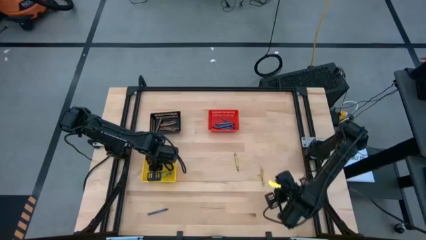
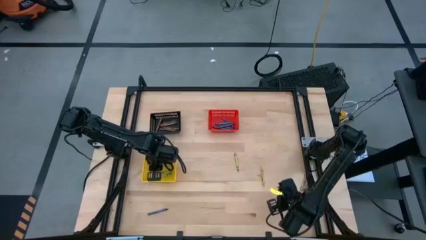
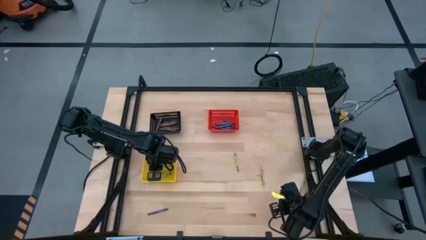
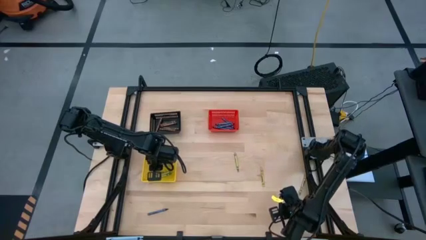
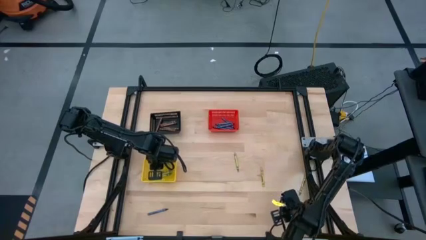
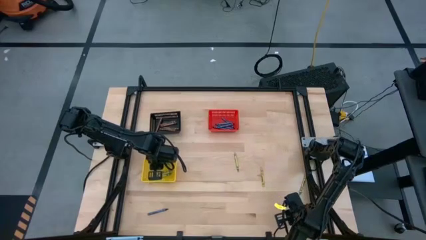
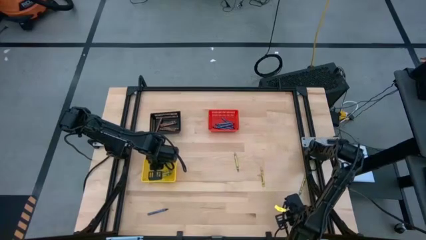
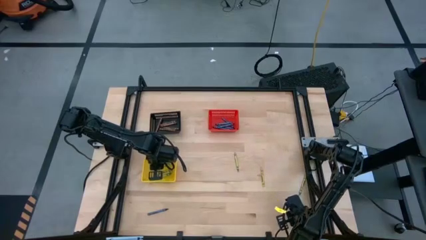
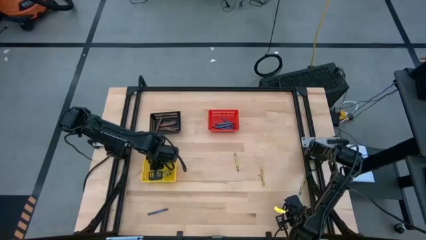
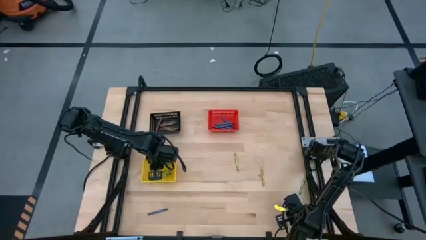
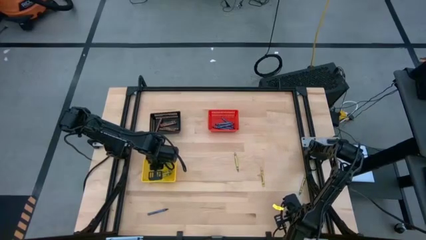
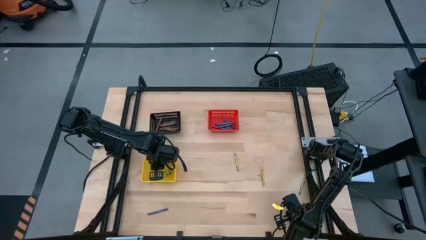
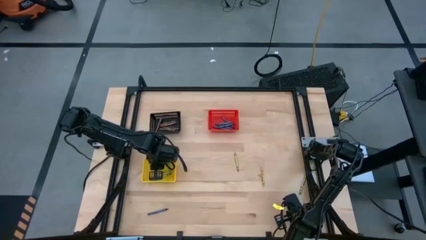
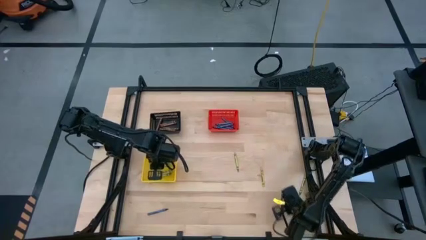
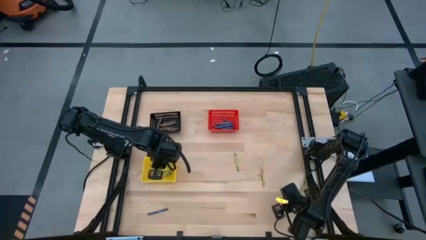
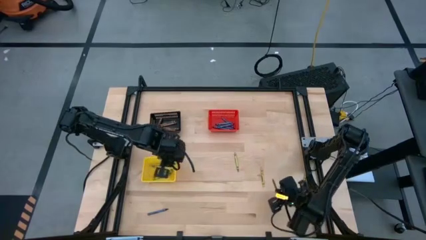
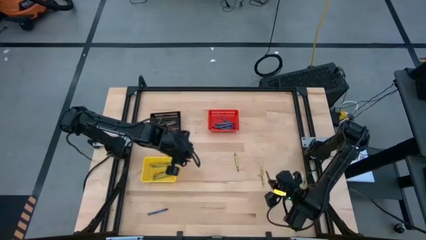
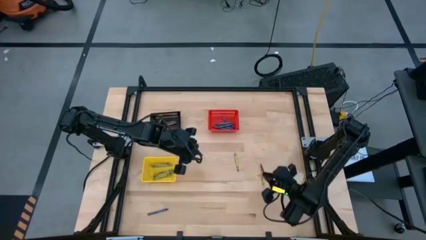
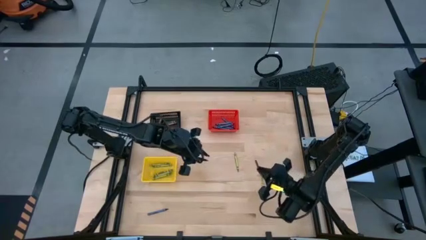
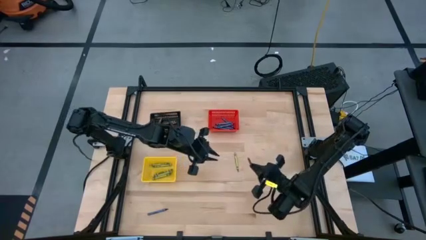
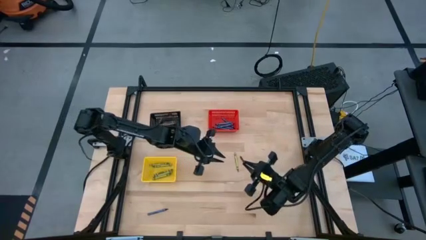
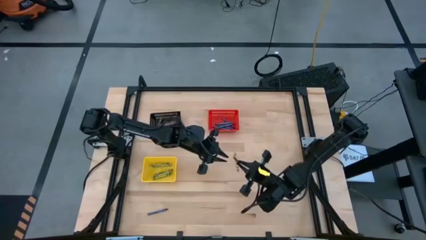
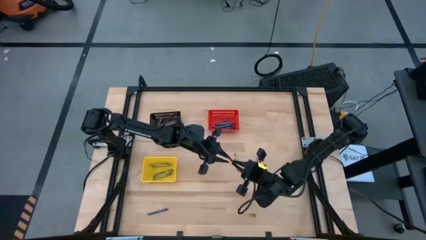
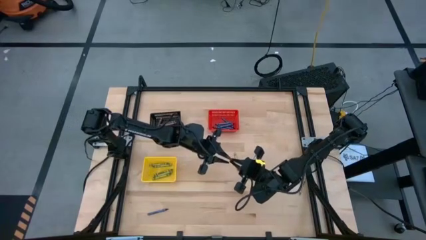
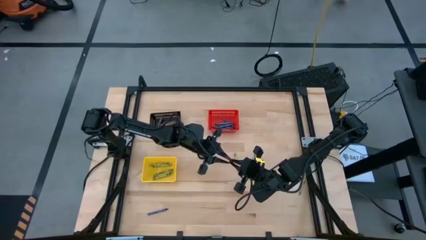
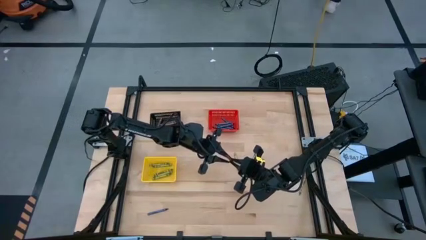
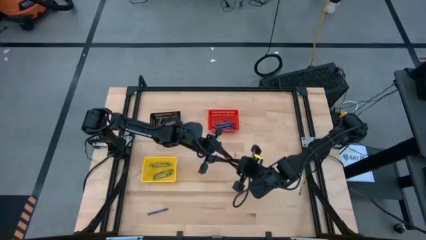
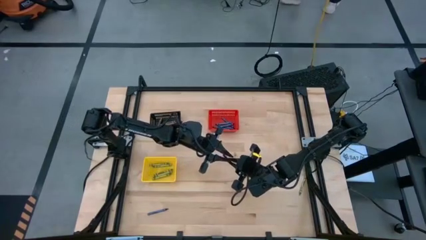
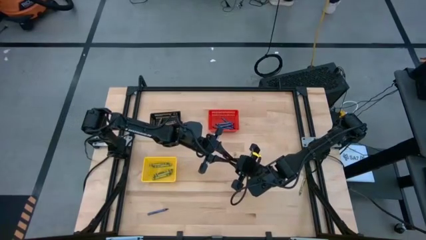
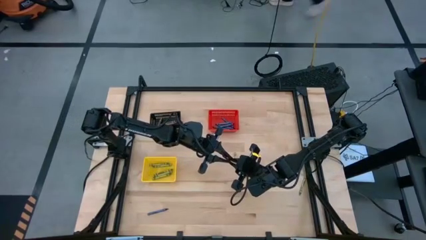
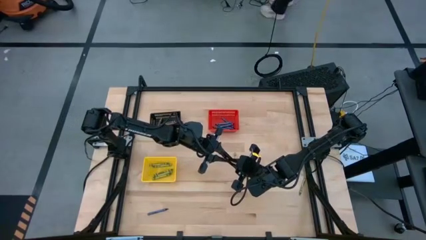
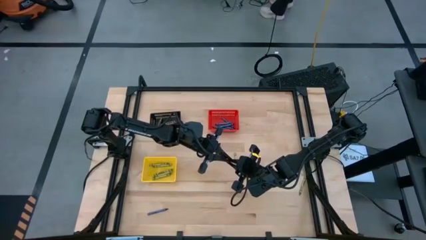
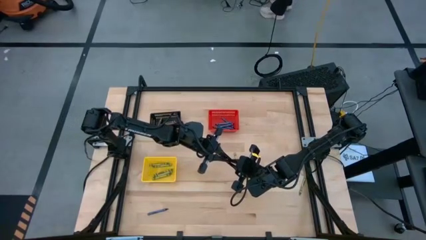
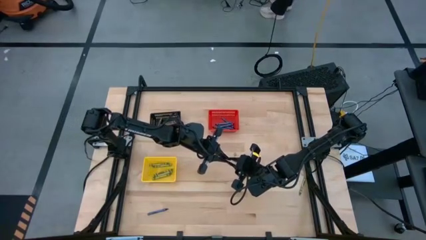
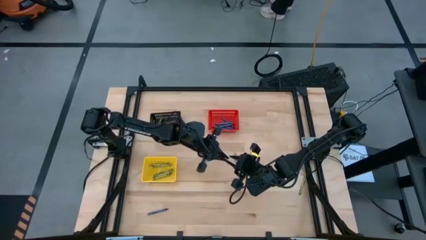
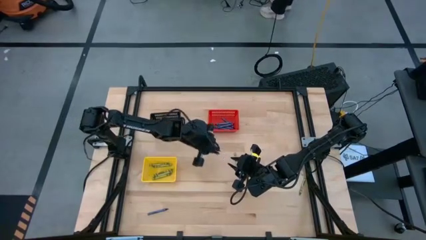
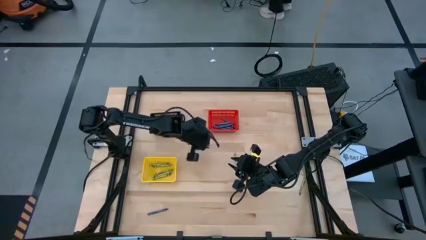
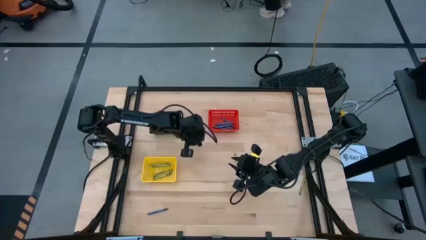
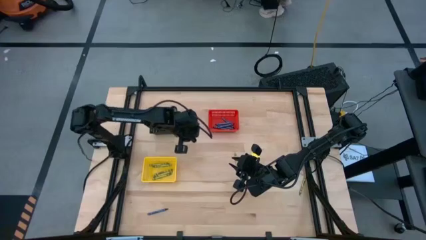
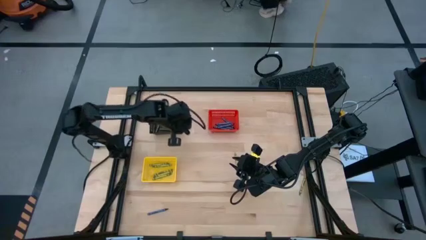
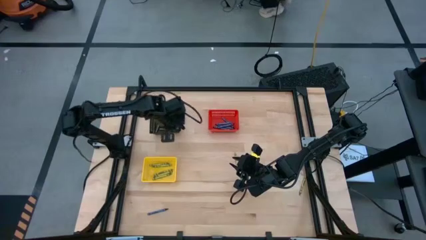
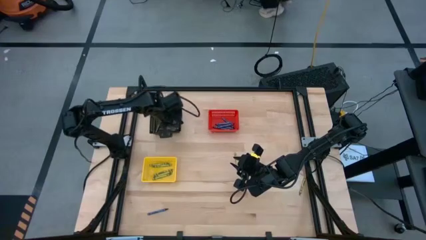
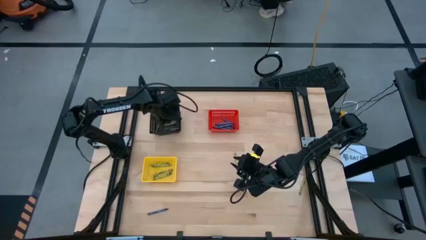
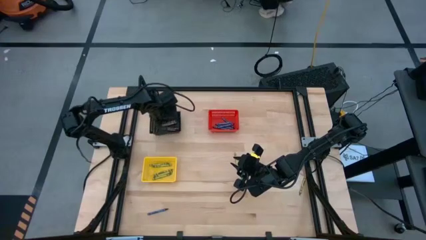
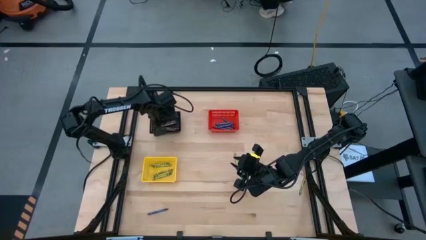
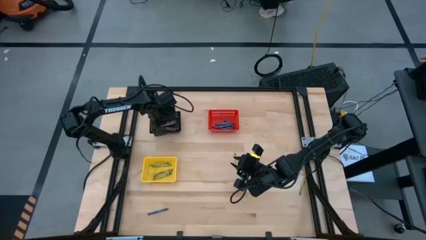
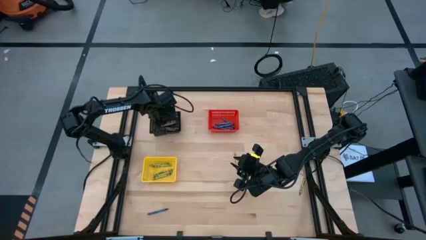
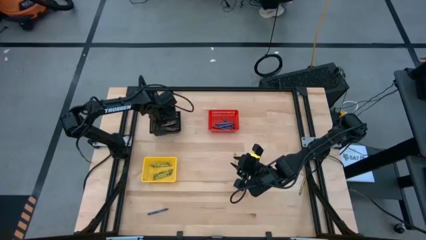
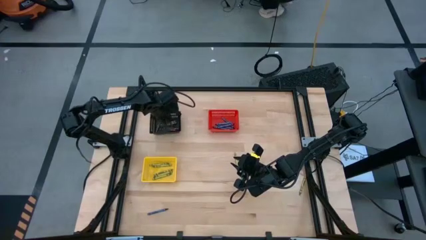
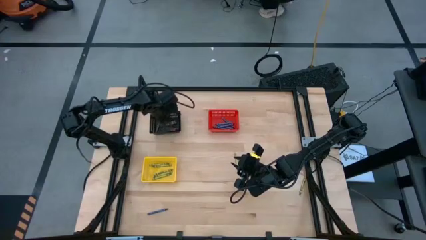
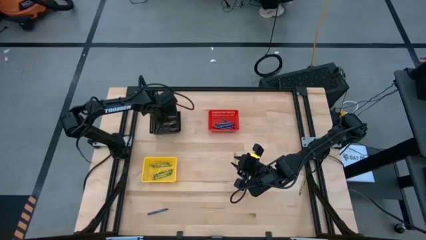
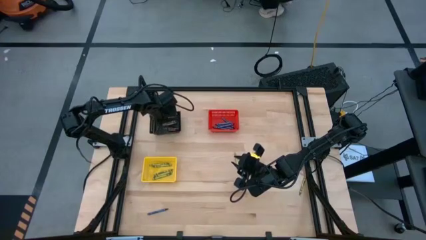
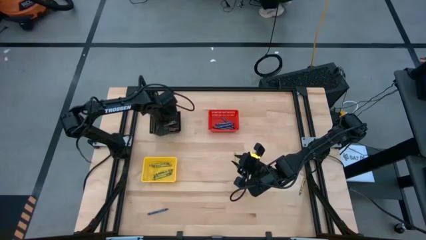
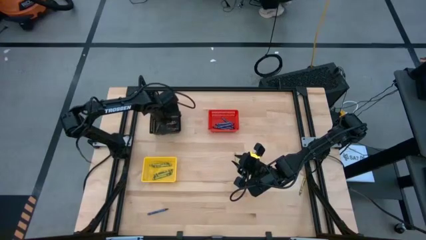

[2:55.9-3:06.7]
Task: Sort crayons
Put the brown crayon into the black bin

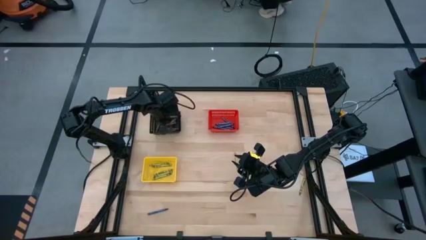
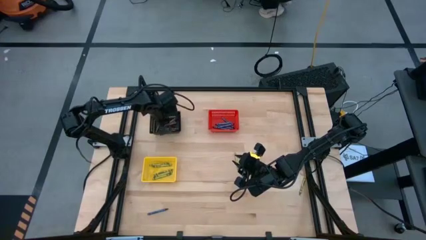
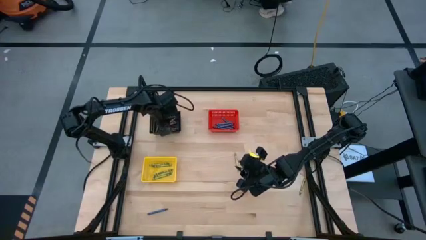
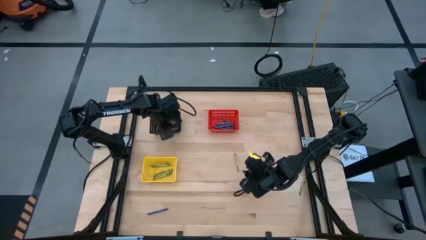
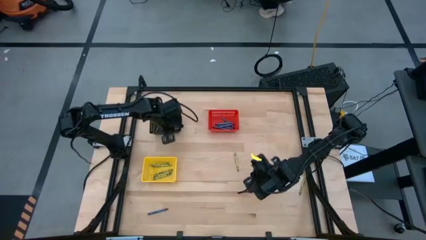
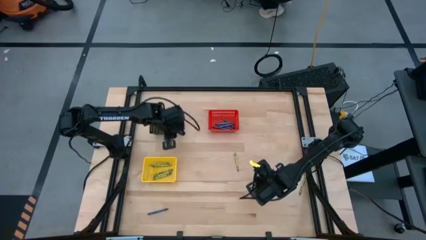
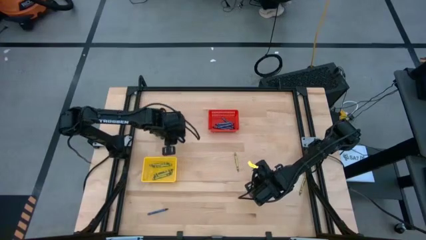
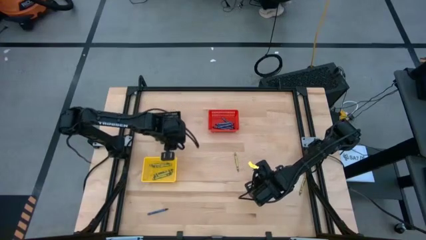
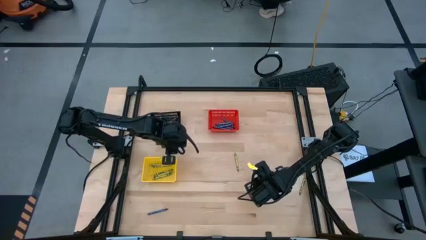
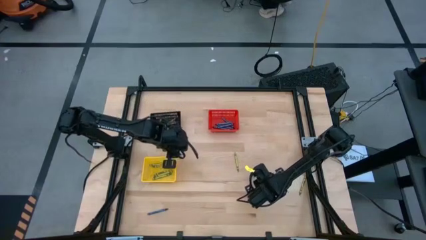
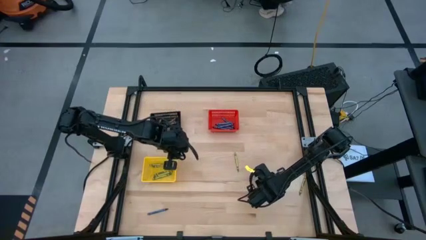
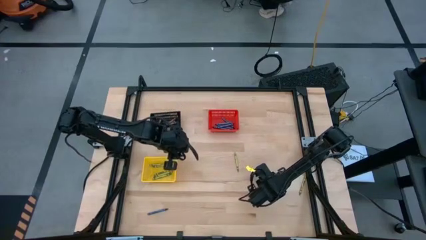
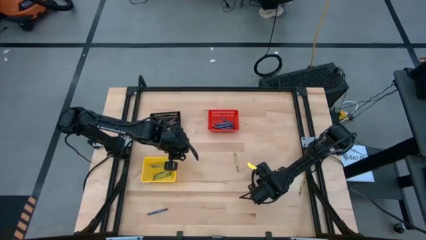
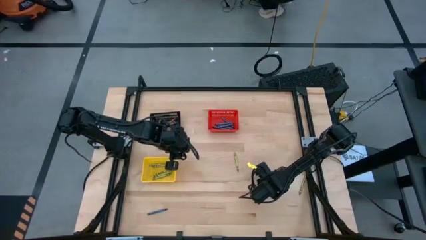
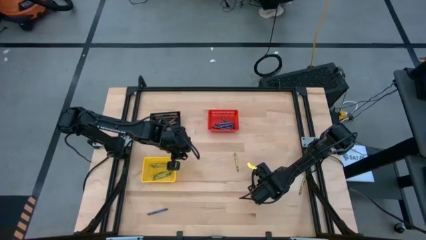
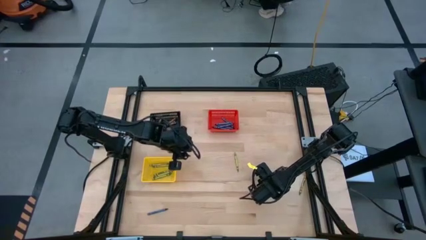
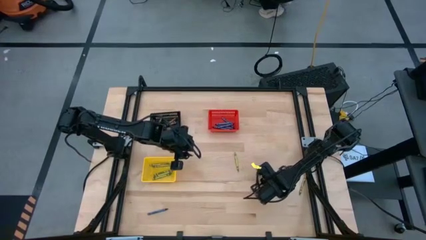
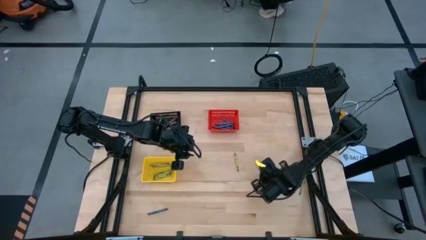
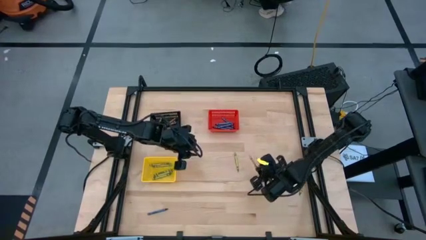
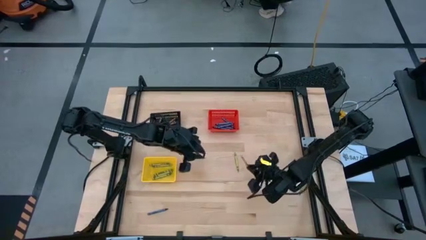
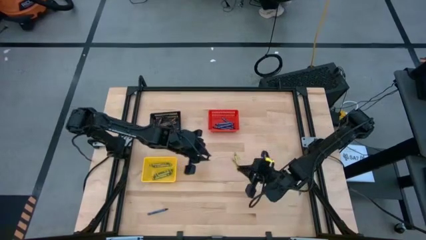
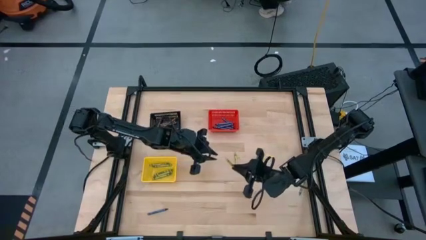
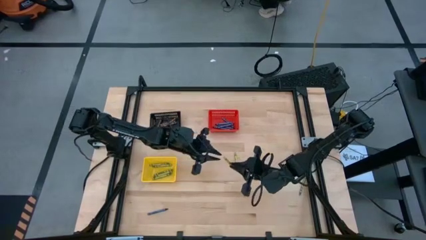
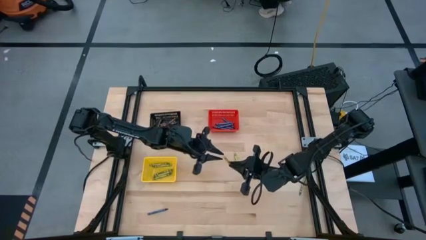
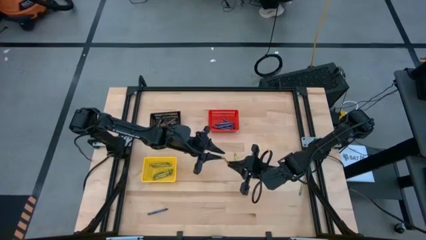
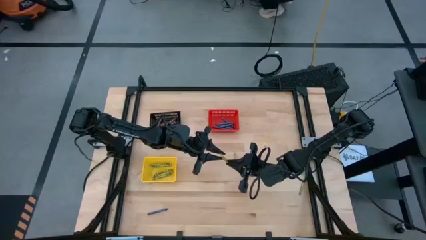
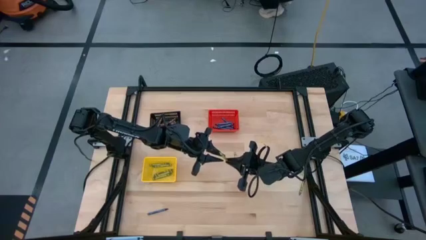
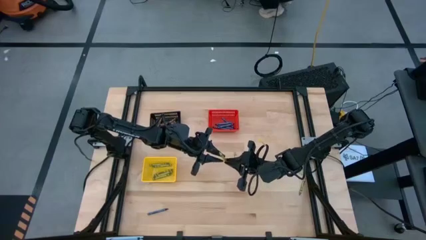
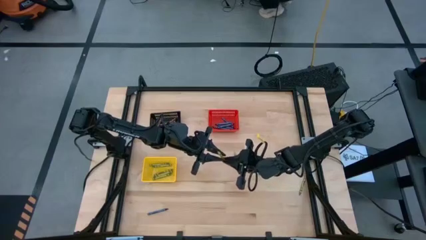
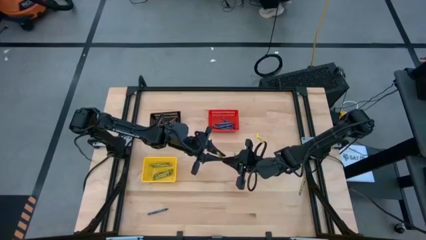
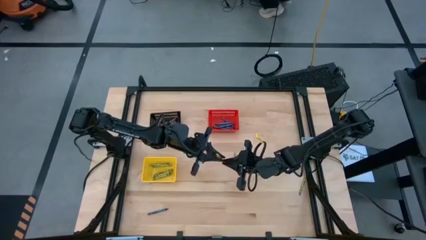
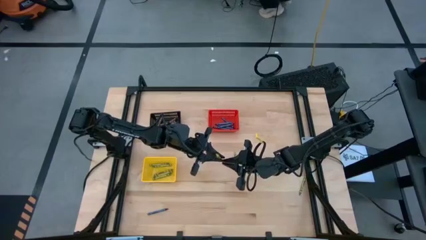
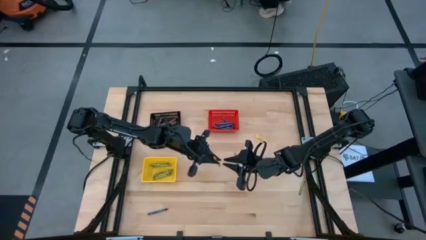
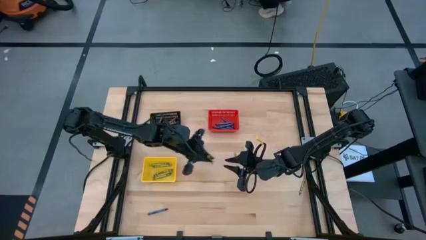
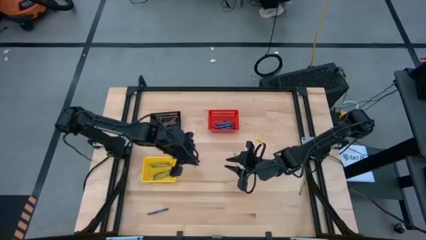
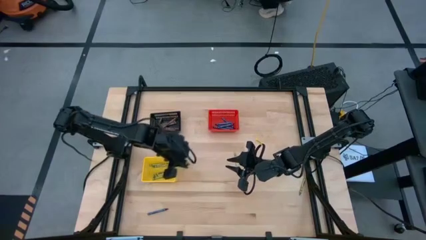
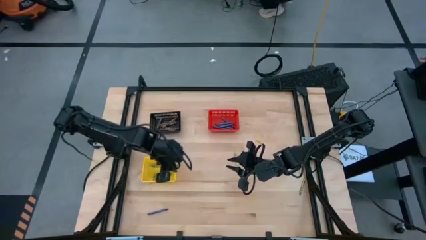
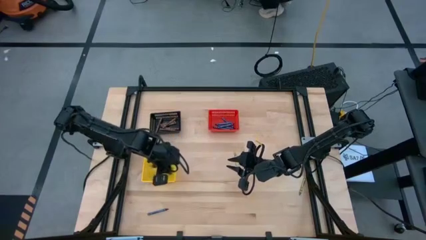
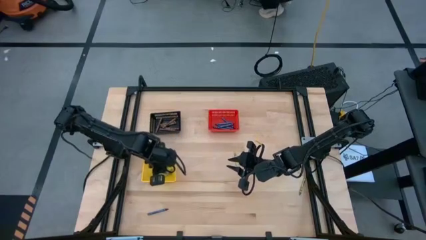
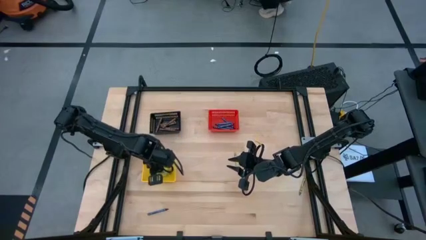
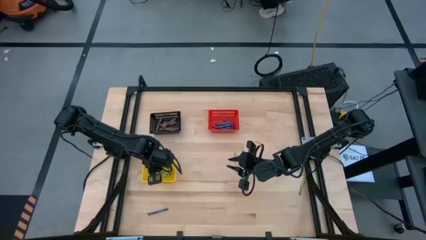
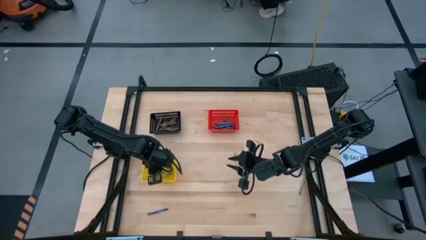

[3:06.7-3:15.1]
Put the light green crayon into the yellow bin
